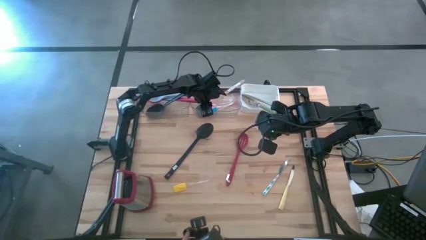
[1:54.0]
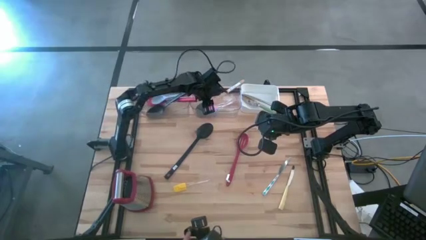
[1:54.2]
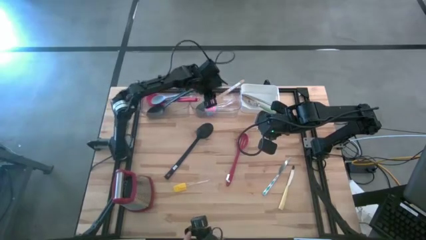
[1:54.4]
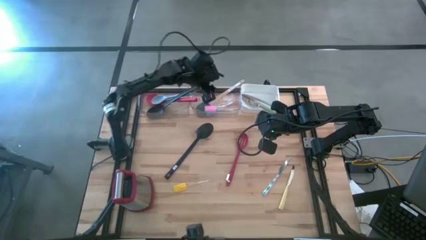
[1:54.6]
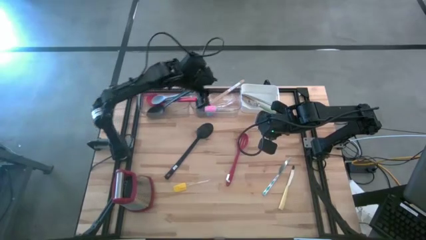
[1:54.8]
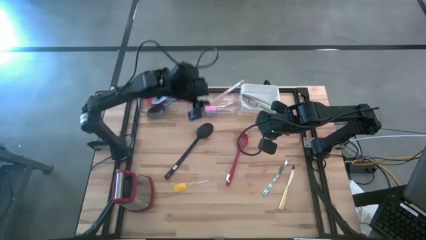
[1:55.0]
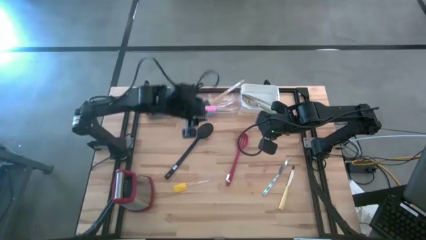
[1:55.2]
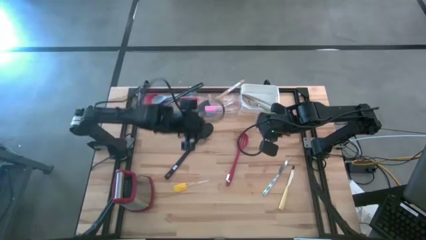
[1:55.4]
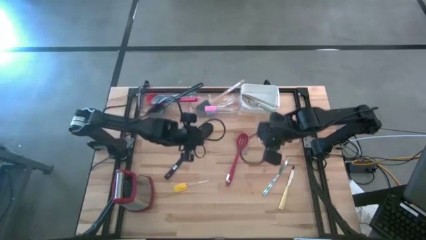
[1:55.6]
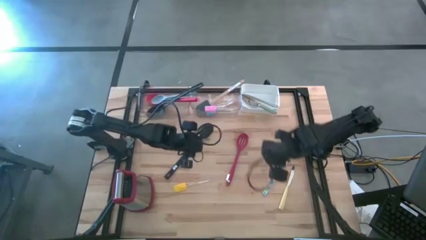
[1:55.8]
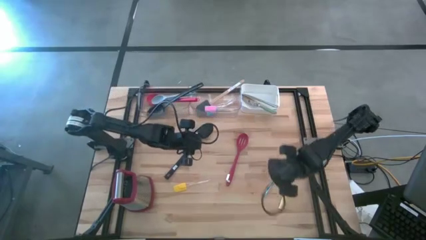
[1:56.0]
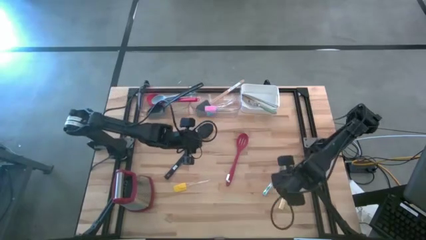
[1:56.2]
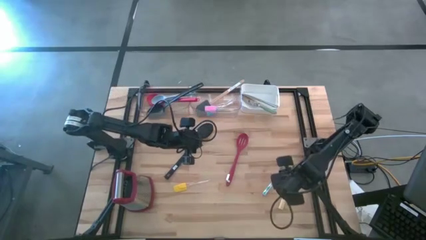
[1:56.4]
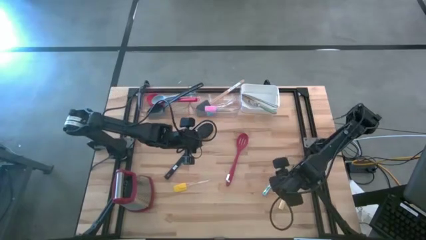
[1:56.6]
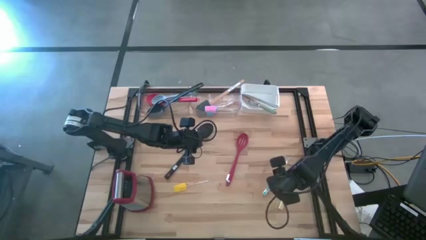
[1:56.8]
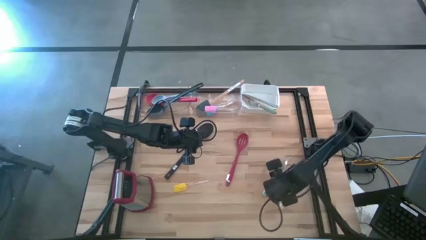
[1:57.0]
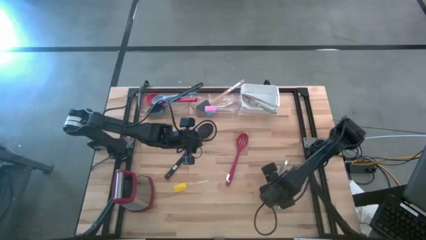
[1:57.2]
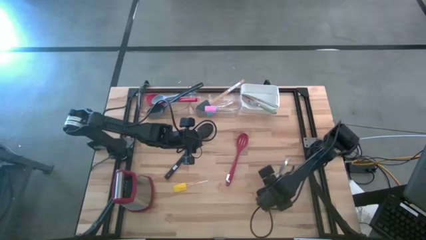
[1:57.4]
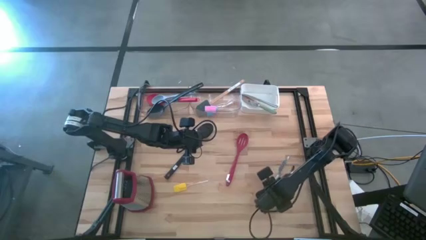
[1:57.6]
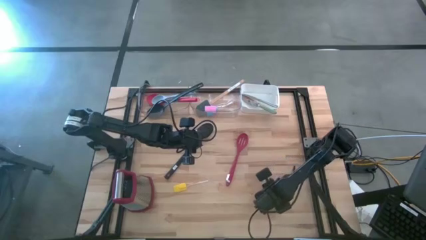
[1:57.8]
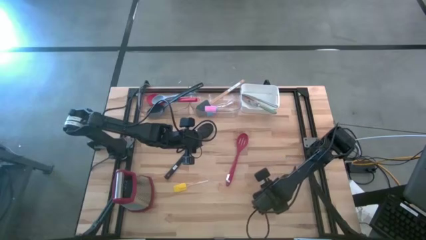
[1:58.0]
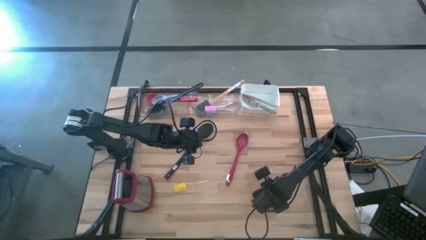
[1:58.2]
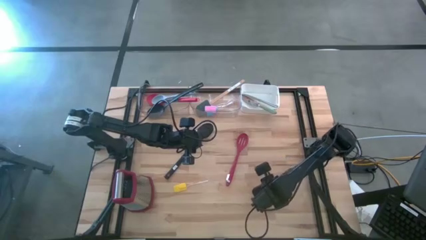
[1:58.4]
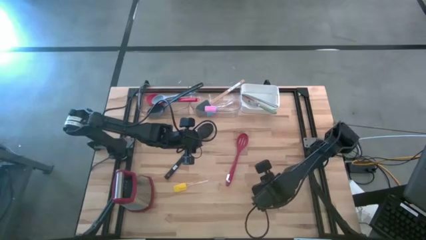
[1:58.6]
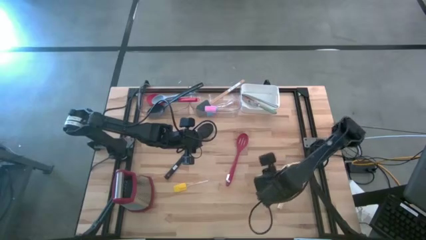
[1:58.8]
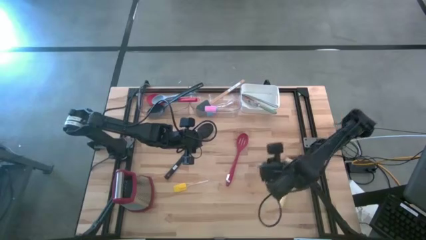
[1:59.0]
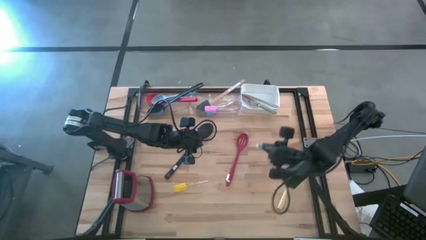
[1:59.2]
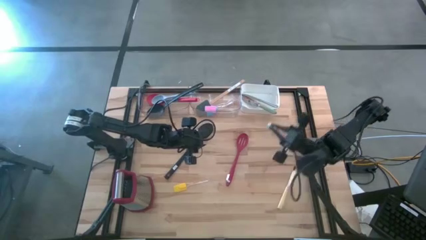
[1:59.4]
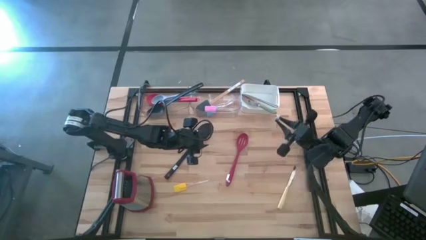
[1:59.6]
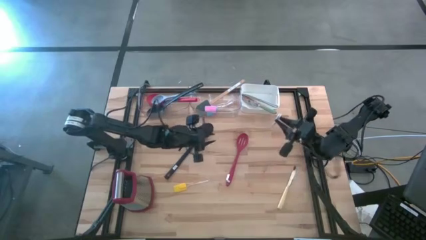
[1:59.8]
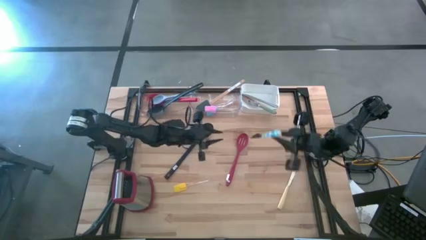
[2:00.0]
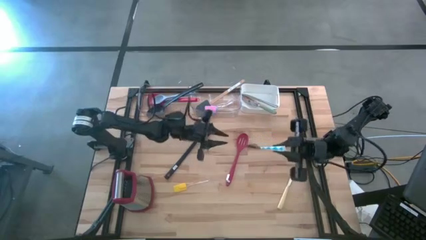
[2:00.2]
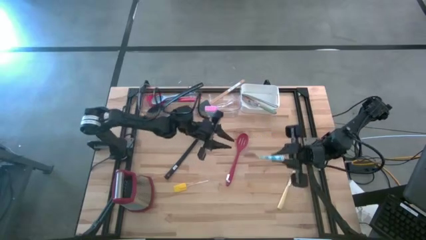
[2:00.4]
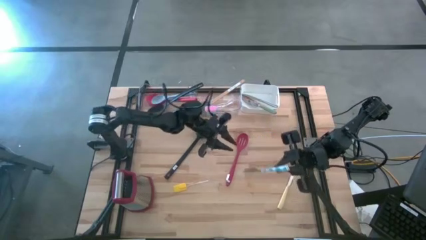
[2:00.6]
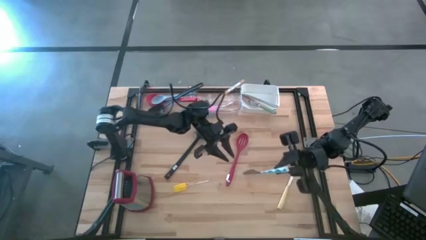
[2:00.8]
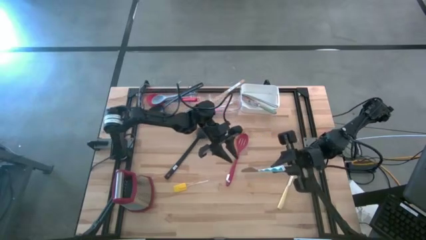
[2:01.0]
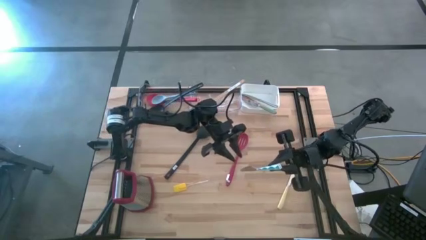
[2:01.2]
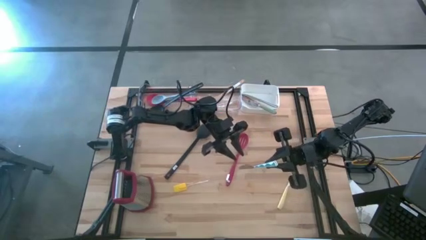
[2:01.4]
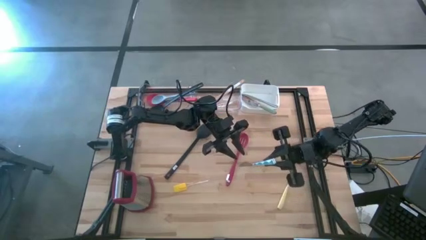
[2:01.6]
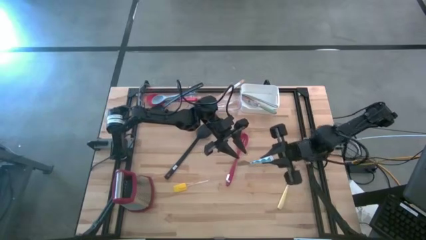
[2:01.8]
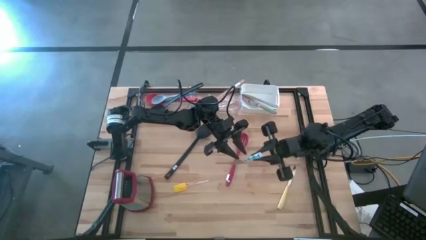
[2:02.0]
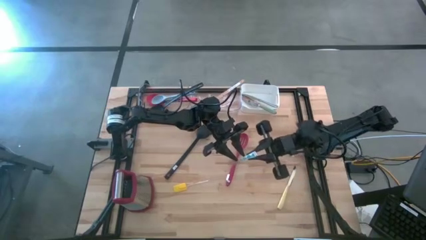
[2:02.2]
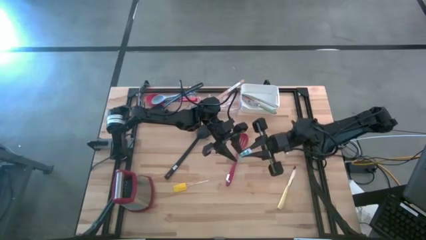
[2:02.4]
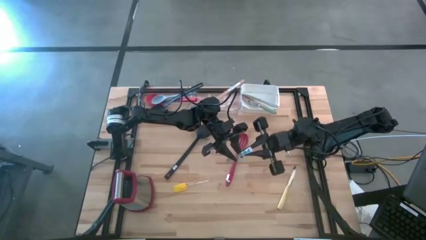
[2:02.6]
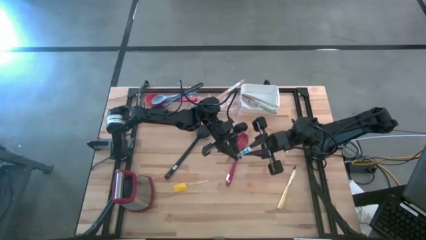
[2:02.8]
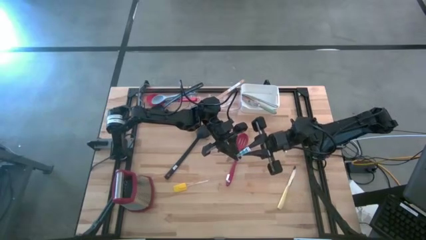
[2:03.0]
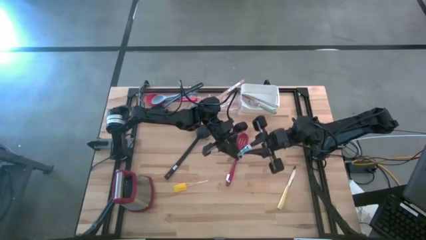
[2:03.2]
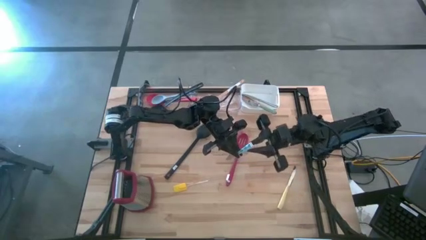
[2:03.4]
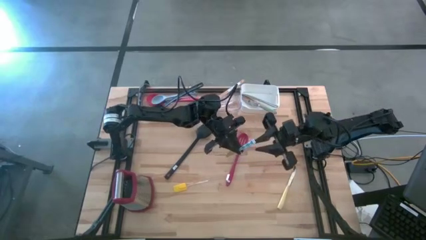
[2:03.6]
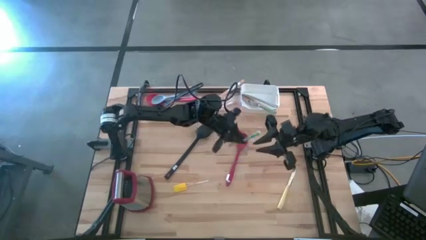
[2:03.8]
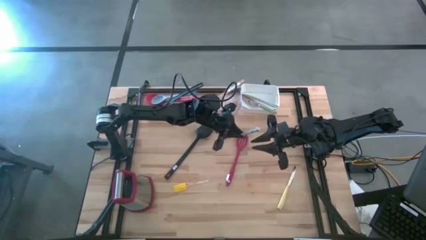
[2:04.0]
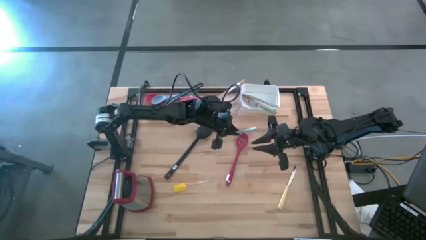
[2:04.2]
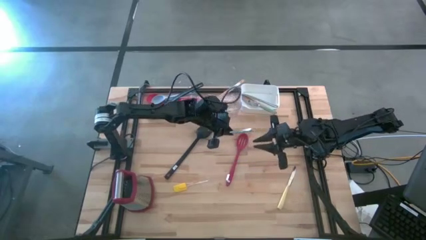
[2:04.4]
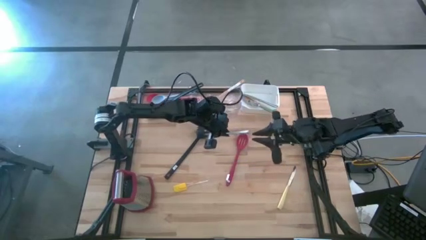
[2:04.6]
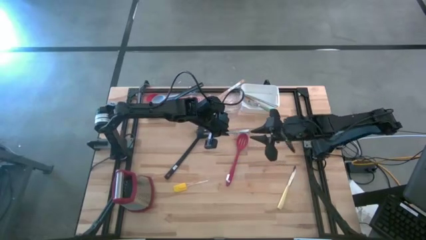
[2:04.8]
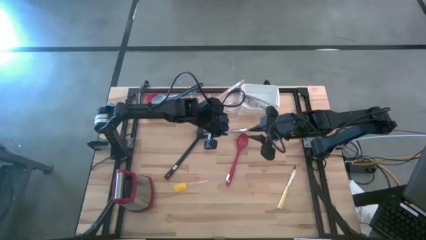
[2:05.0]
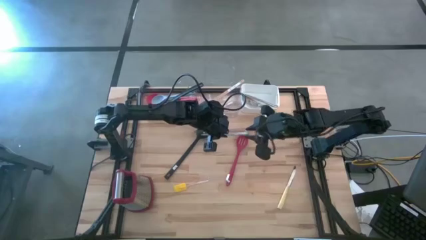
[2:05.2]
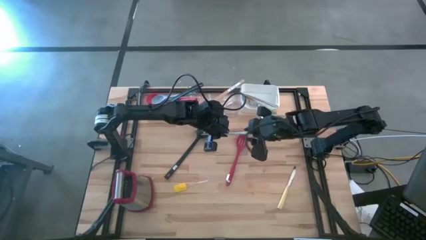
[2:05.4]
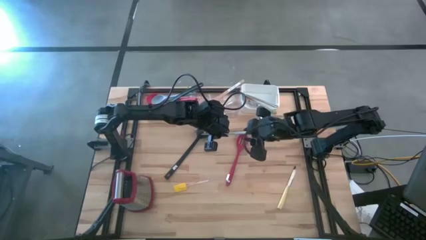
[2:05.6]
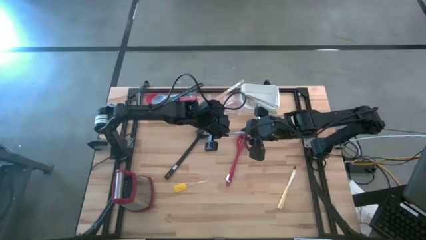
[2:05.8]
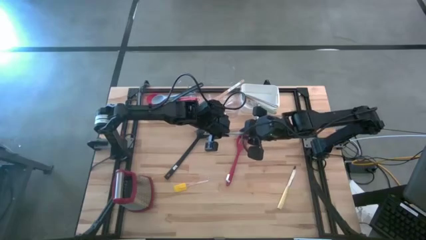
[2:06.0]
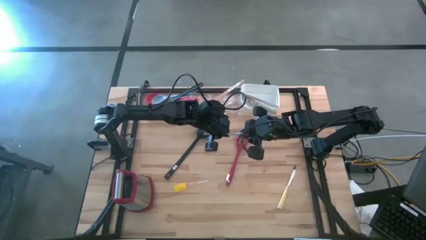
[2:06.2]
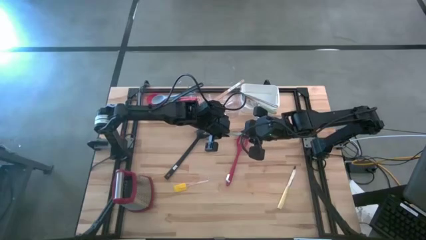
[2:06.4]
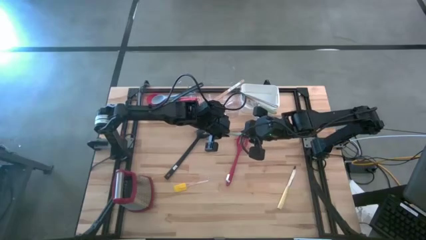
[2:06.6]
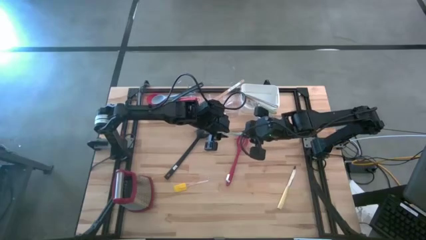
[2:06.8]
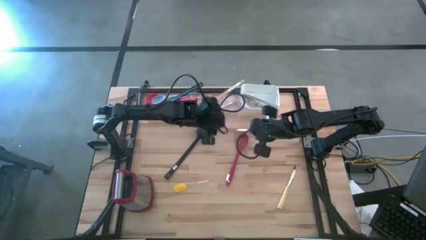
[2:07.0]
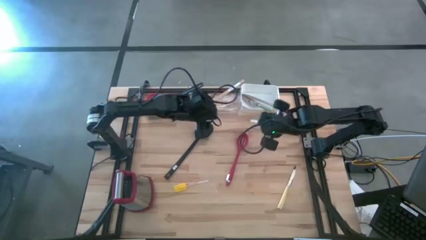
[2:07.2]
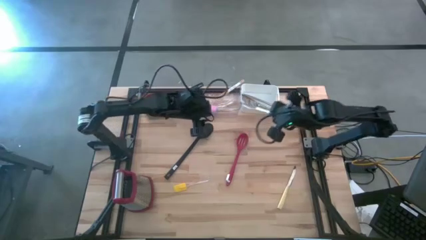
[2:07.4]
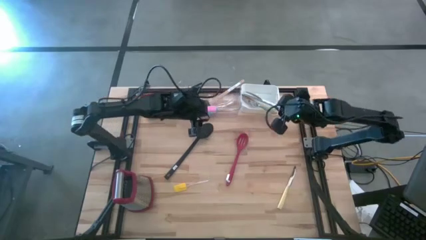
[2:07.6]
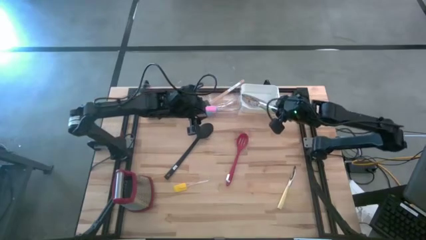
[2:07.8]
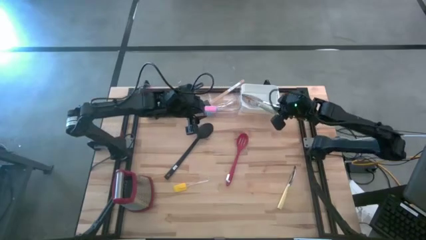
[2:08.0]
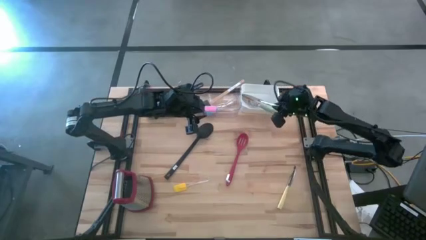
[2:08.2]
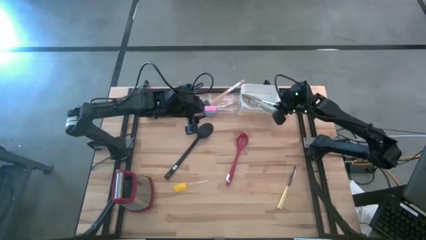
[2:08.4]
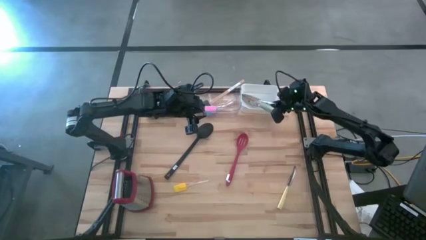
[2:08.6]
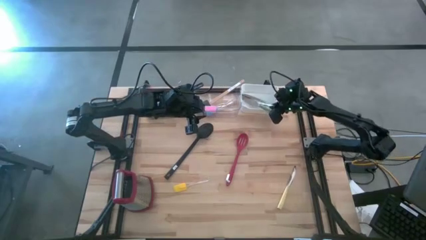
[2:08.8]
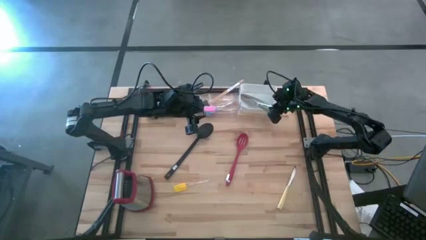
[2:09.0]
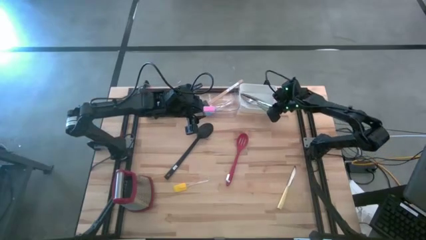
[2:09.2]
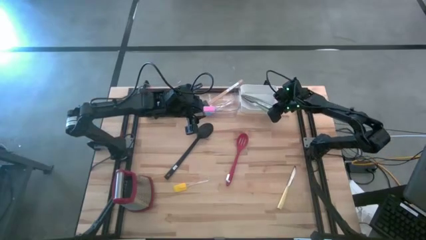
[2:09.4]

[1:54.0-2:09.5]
Task: Pick & Place Kitchen Items
Put the blue patterned table knife into the white bin
